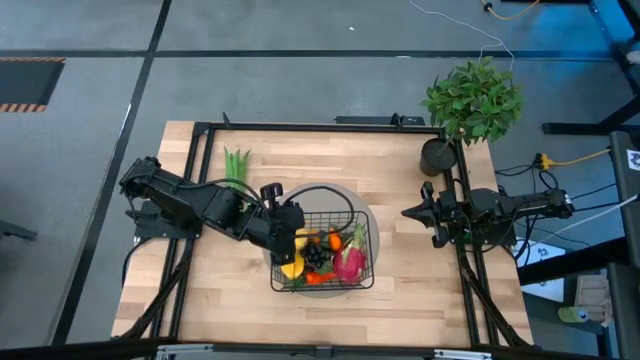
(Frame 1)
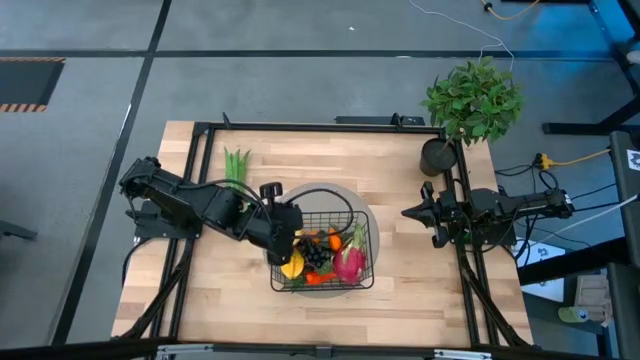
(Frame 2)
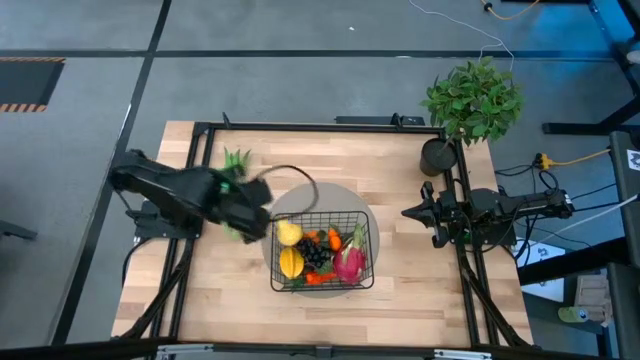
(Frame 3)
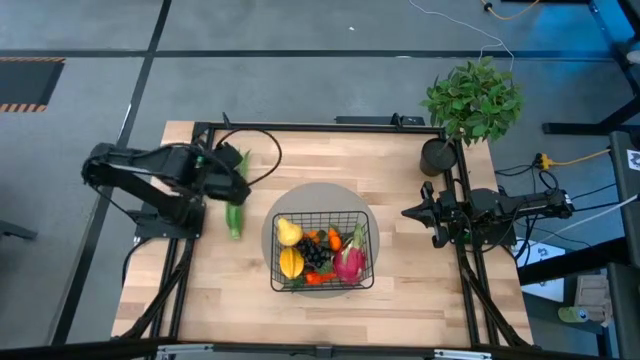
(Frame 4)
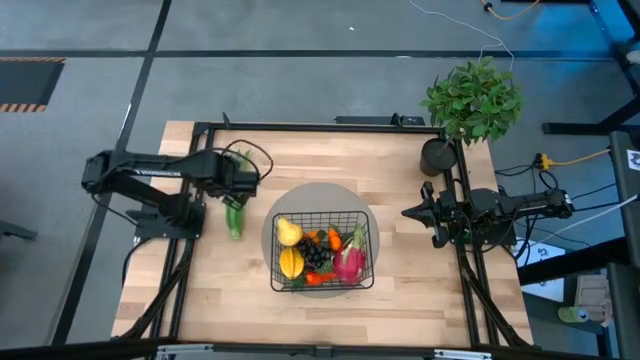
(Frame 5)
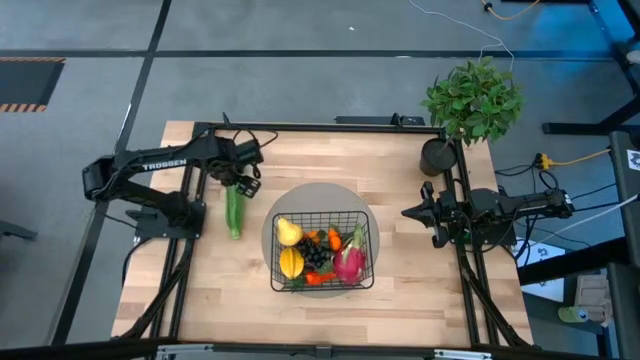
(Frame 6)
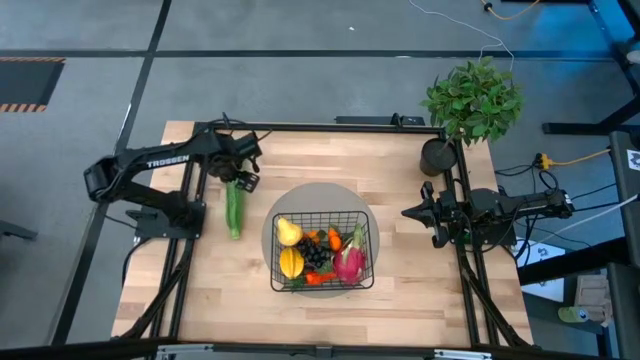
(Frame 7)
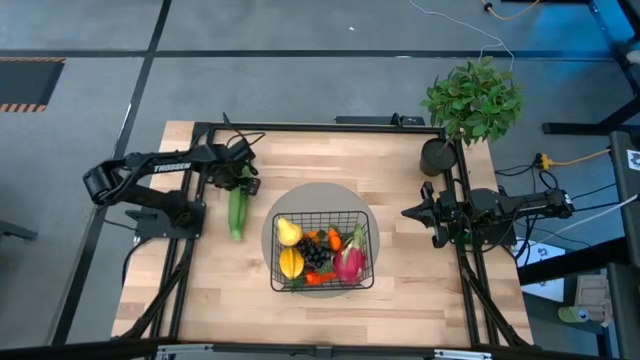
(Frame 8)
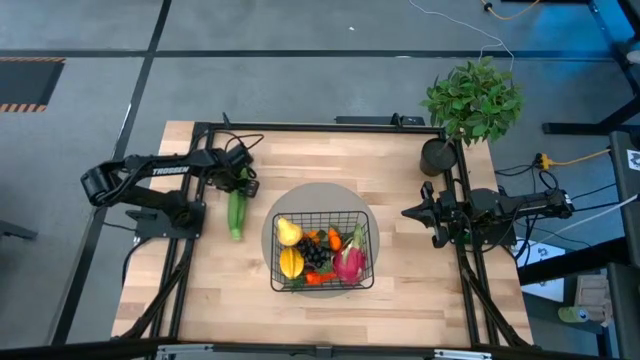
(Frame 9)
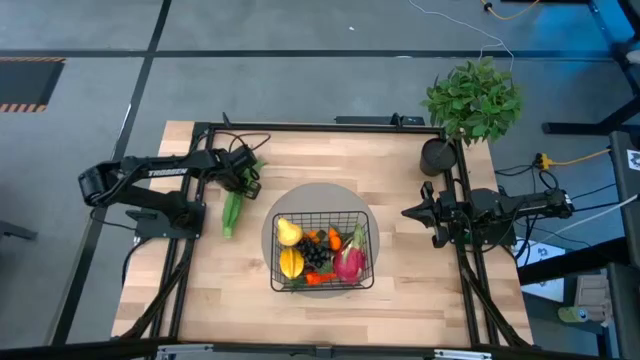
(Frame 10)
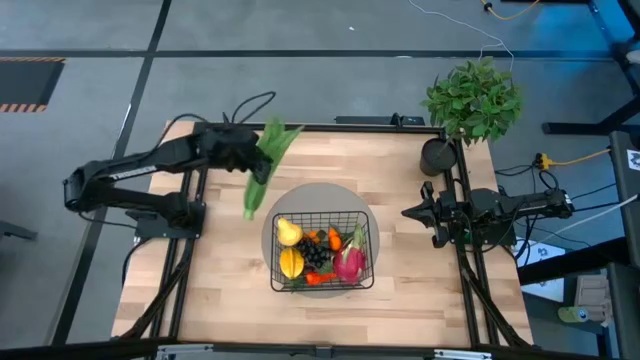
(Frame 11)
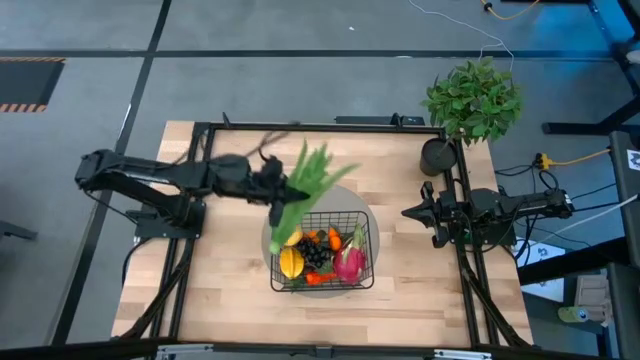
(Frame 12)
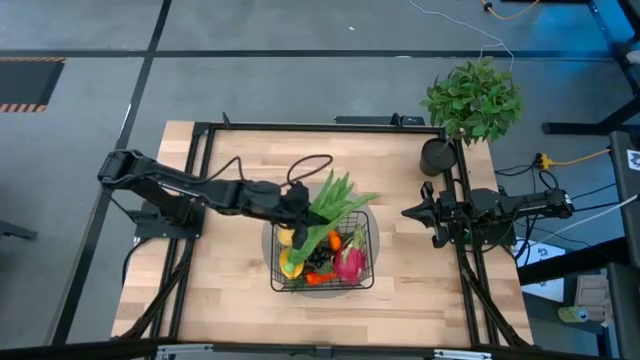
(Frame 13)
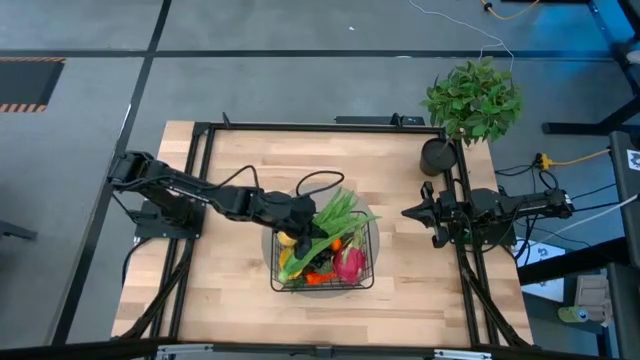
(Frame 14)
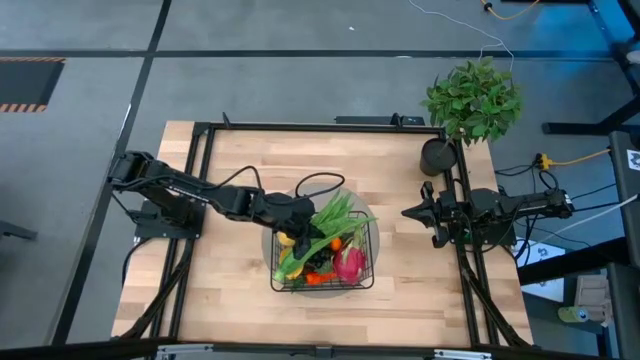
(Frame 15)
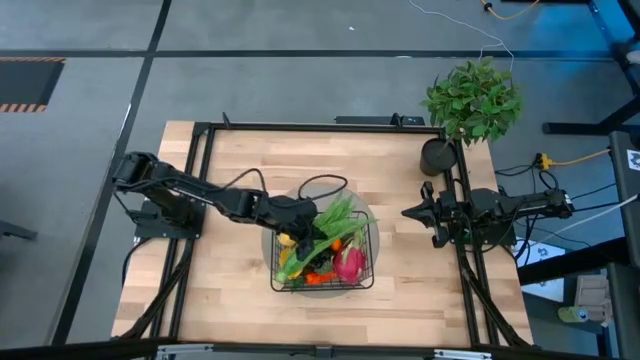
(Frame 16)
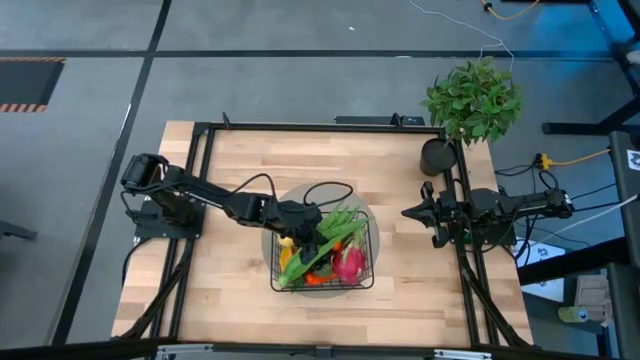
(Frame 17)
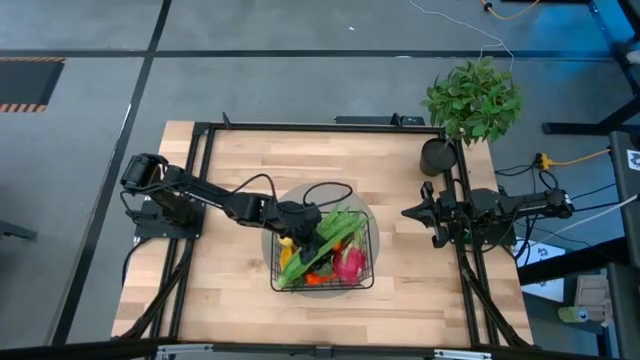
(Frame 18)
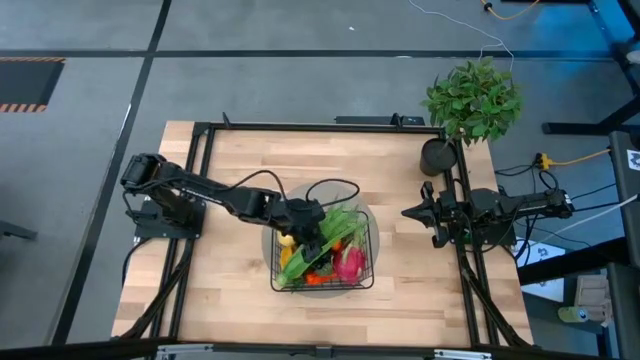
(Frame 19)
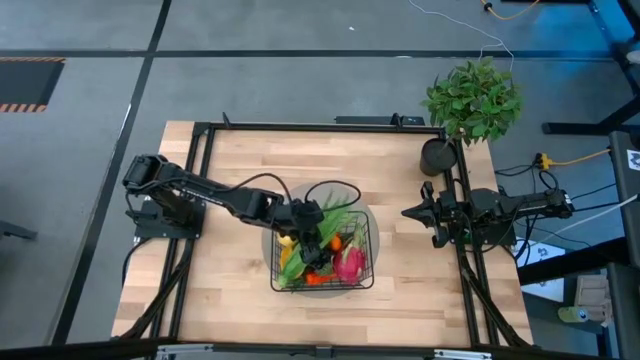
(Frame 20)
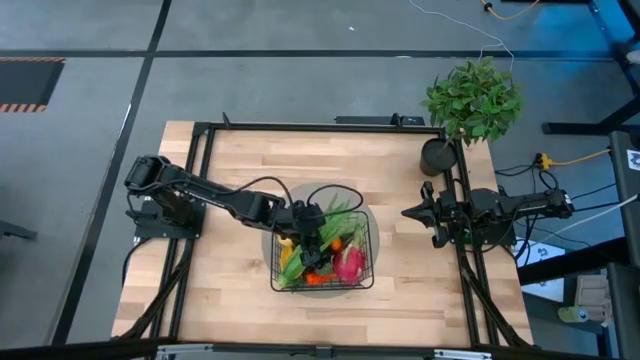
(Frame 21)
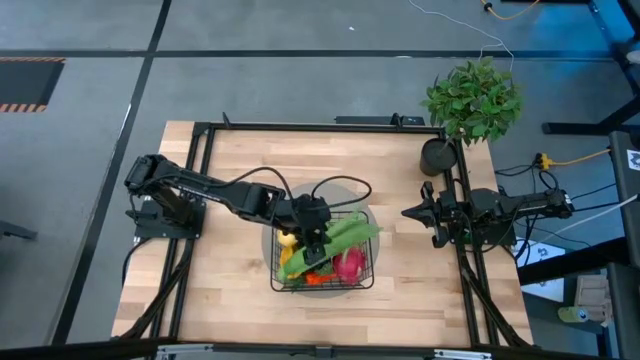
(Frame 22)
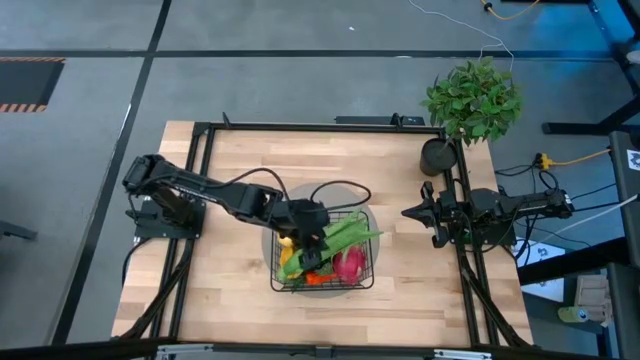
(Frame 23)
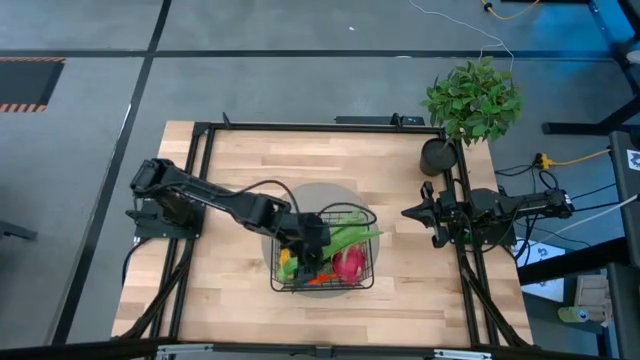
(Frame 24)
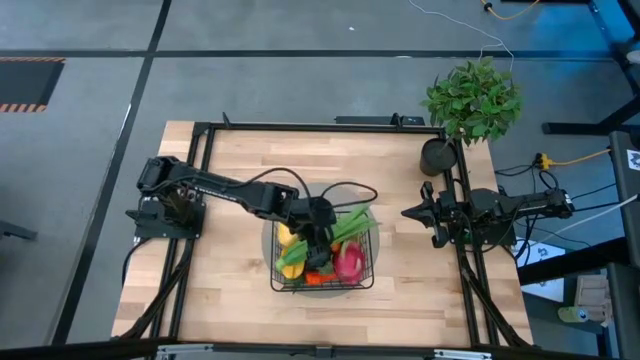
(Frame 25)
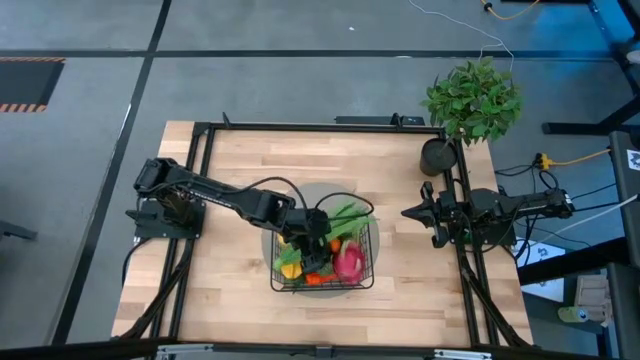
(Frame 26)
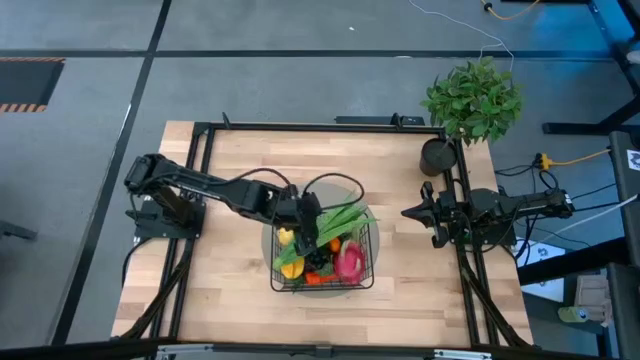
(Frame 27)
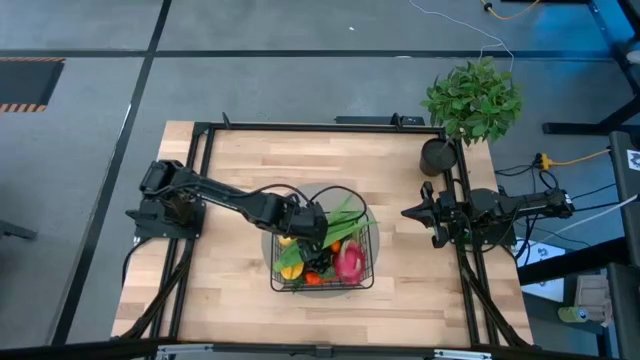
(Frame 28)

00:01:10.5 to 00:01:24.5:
Task: Build produce basket
Put the leaf lettuce into the wire basket

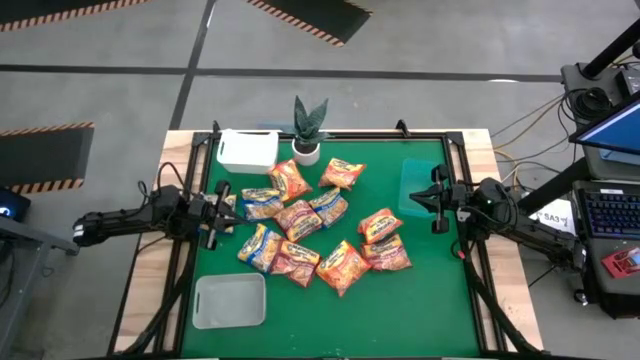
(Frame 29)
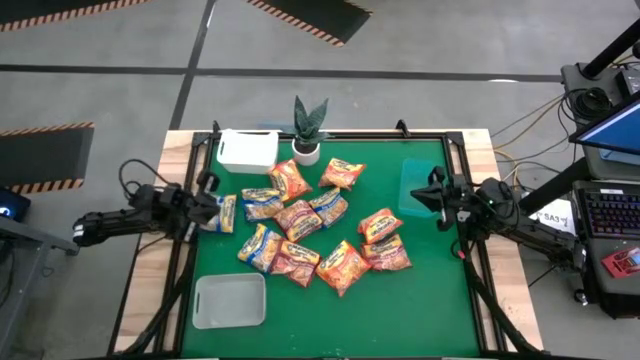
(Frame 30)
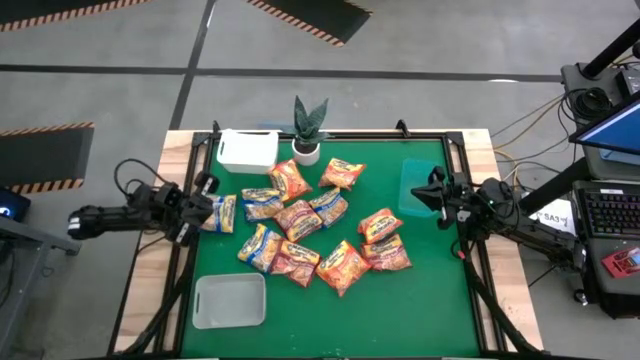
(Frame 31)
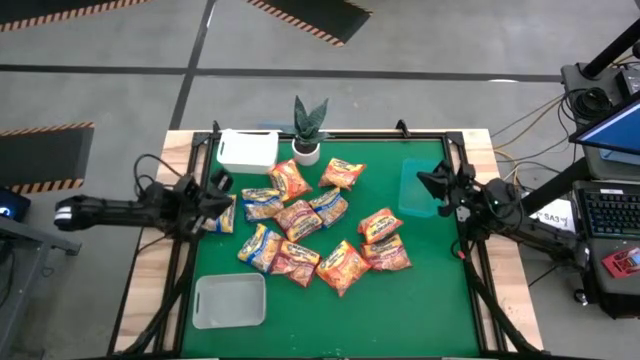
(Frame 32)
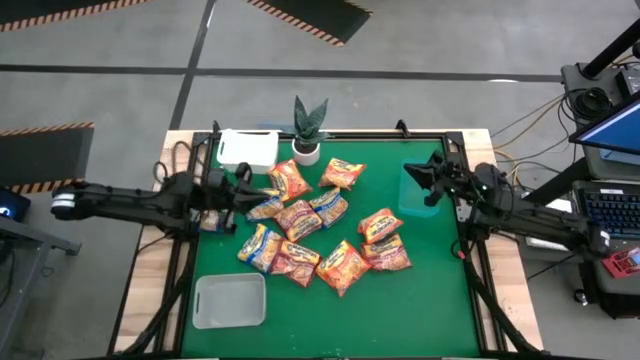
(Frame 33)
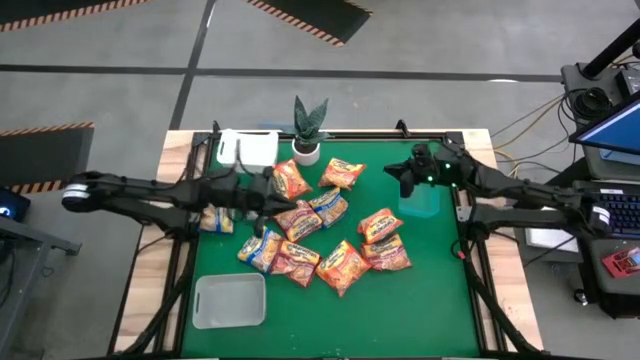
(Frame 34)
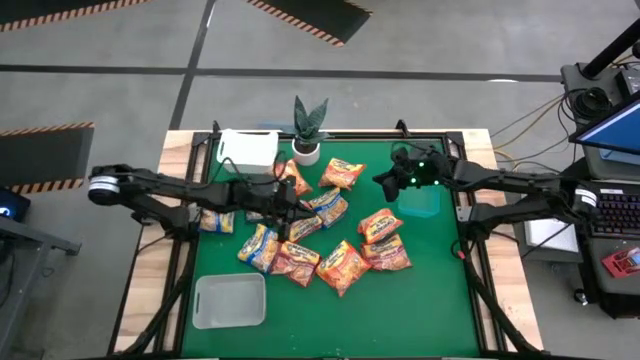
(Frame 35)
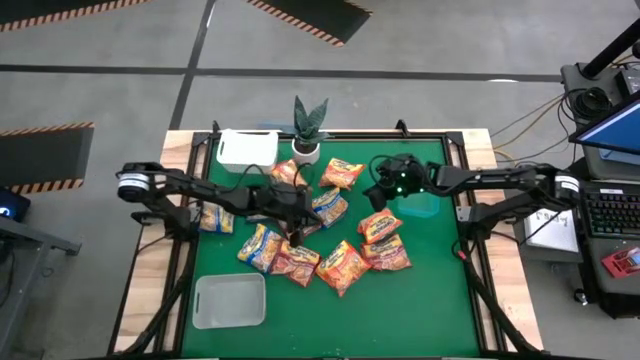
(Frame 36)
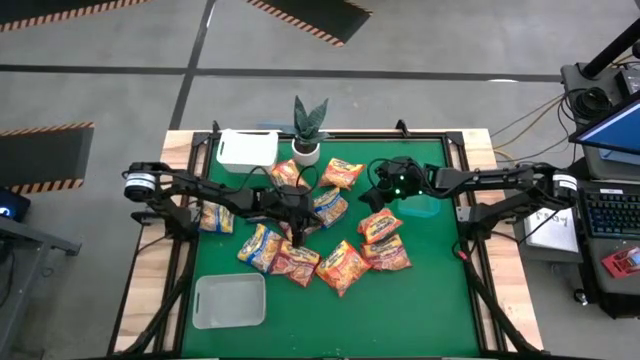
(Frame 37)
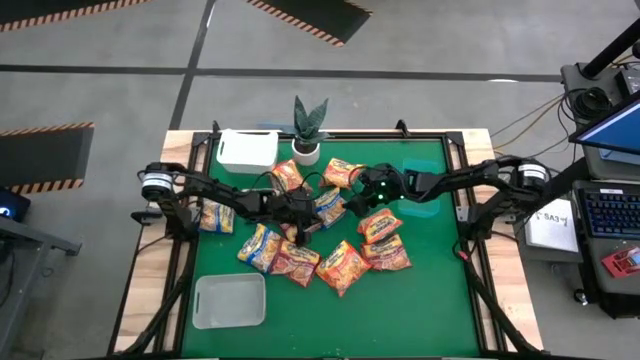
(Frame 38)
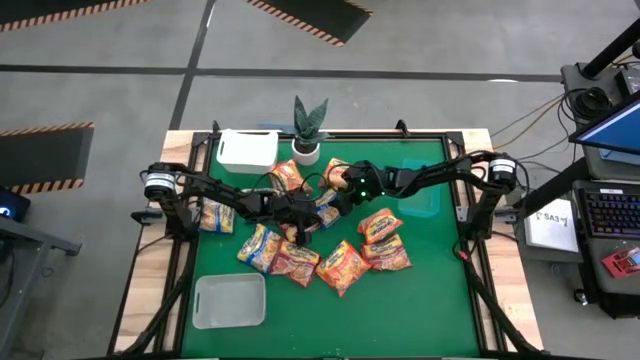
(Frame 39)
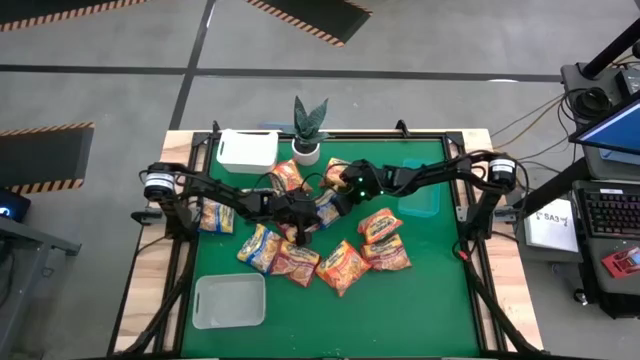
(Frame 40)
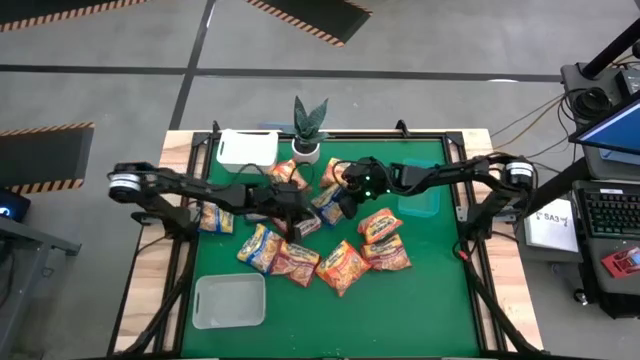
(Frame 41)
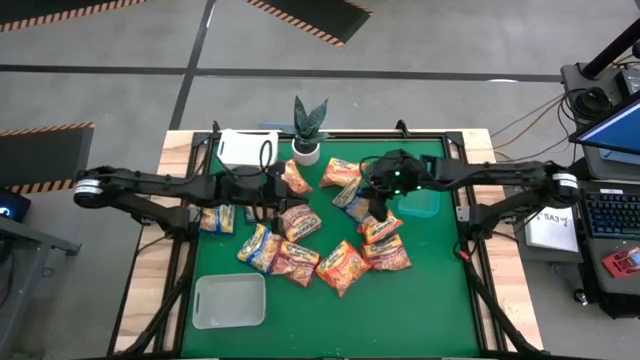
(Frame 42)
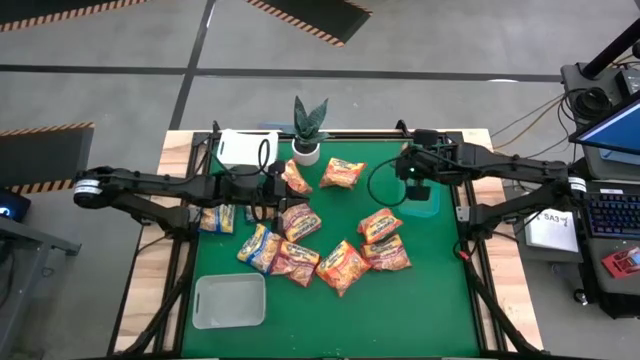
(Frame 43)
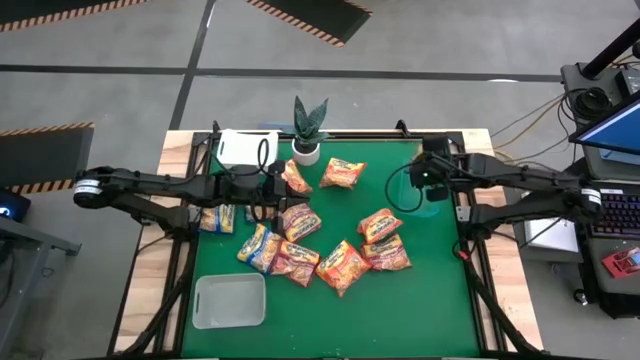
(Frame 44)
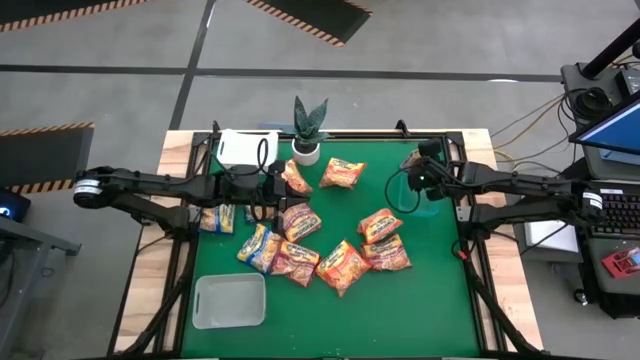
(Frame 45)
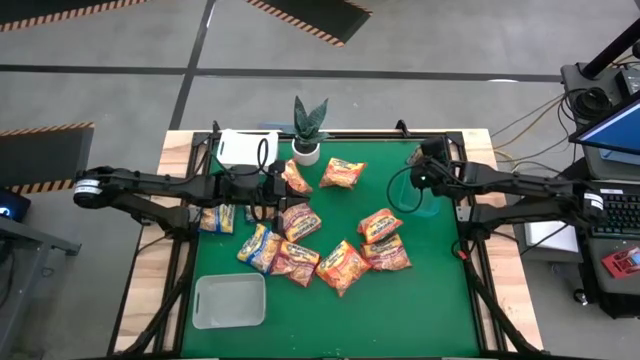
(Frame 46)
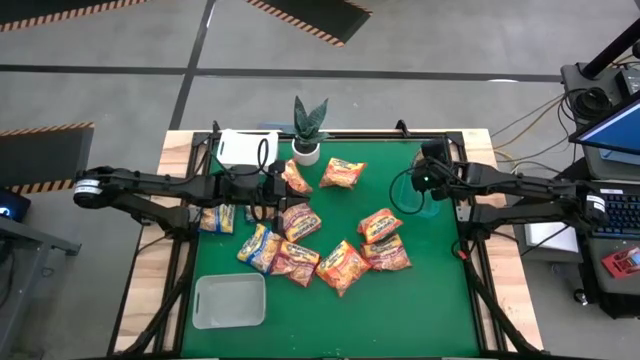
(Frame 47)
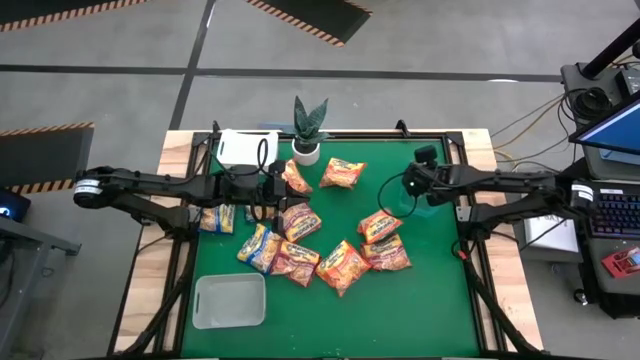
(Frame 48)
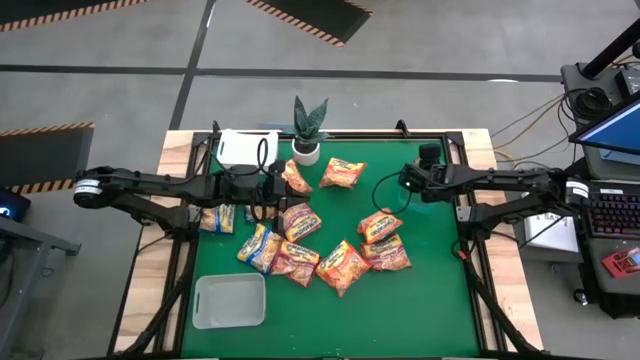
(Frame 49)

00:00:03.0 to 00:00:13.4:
Task: Sort Maruchan noodles
Put the blue noodle pack into the blue bin
